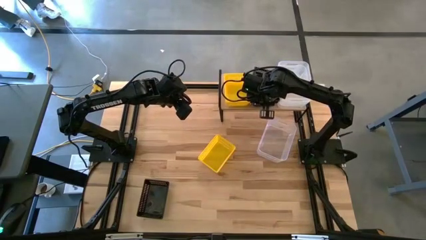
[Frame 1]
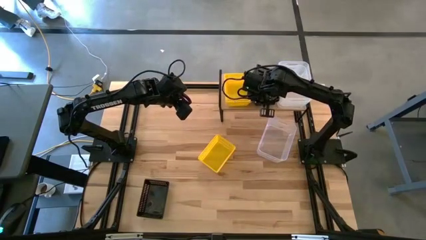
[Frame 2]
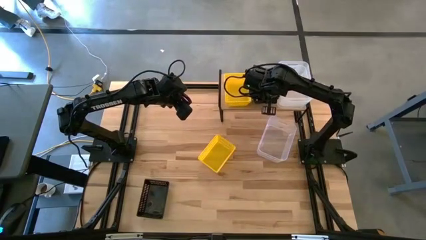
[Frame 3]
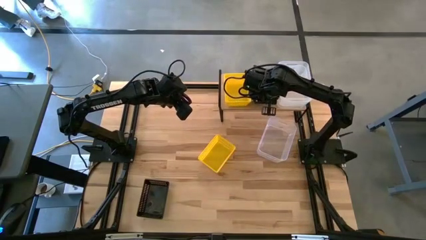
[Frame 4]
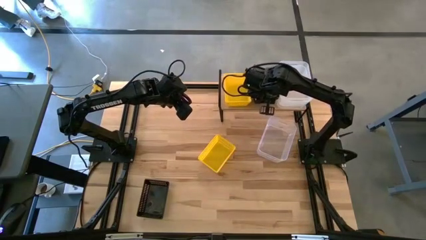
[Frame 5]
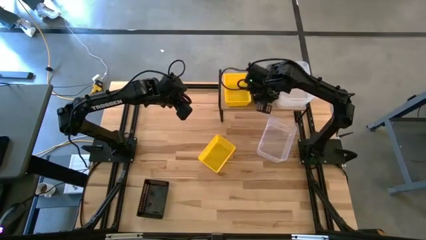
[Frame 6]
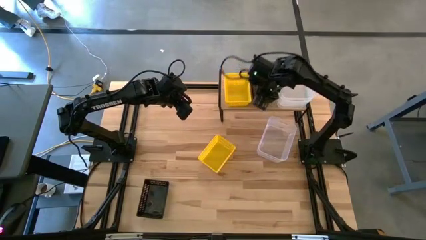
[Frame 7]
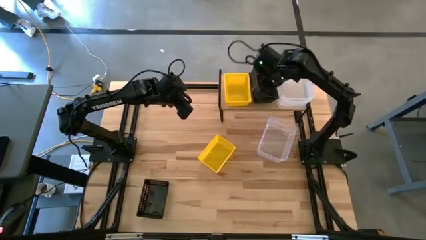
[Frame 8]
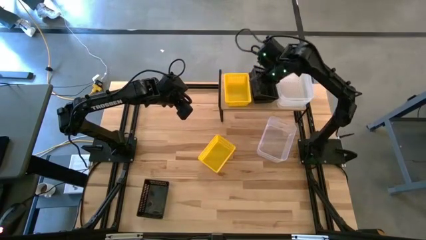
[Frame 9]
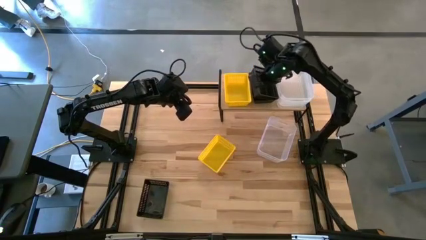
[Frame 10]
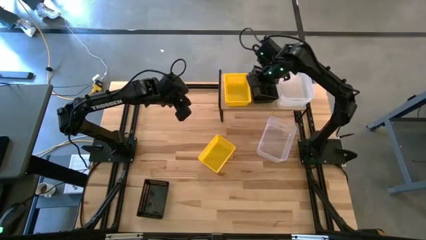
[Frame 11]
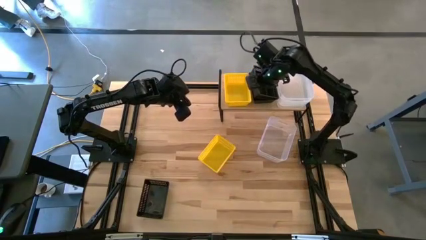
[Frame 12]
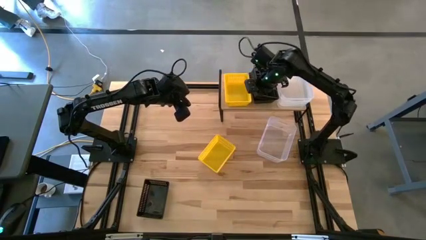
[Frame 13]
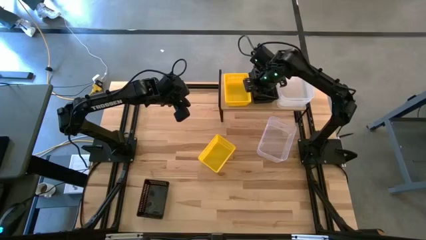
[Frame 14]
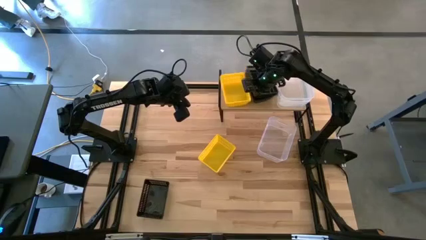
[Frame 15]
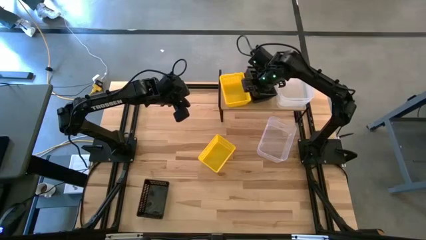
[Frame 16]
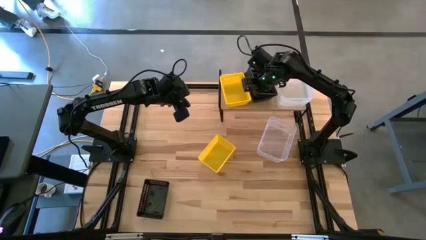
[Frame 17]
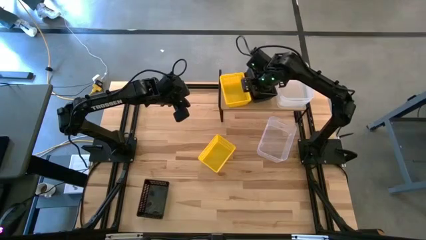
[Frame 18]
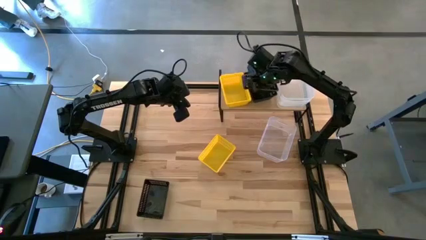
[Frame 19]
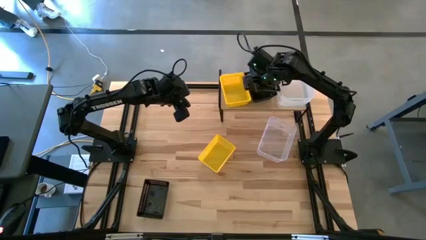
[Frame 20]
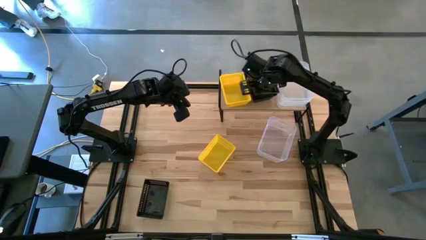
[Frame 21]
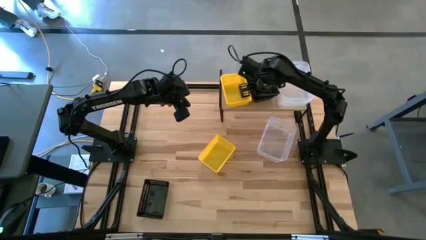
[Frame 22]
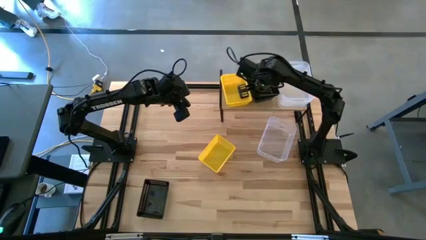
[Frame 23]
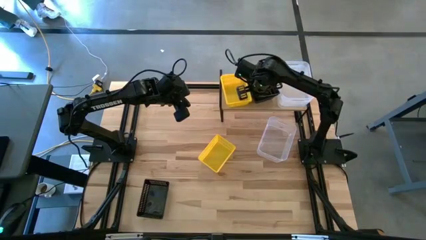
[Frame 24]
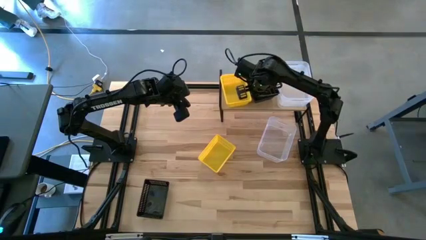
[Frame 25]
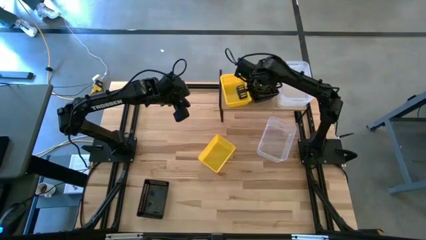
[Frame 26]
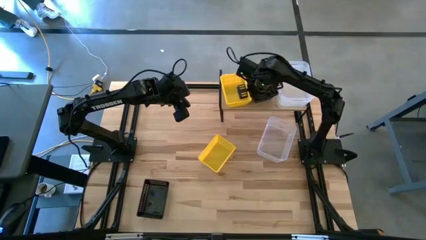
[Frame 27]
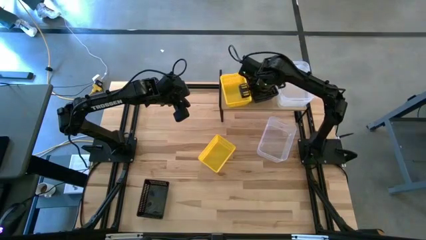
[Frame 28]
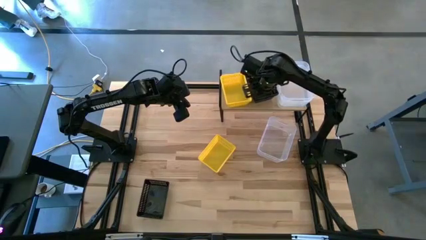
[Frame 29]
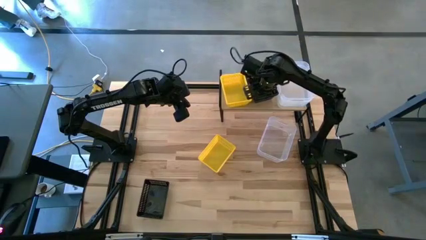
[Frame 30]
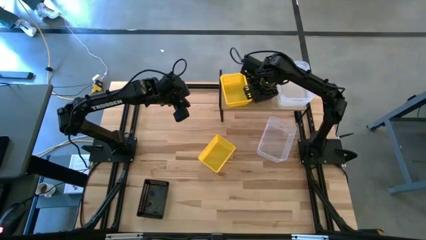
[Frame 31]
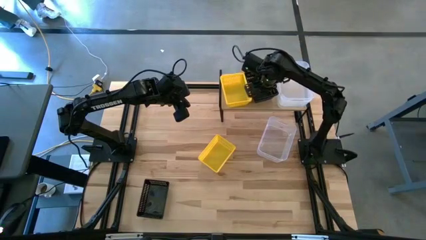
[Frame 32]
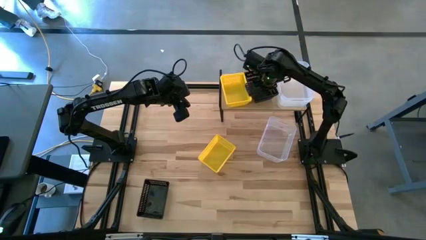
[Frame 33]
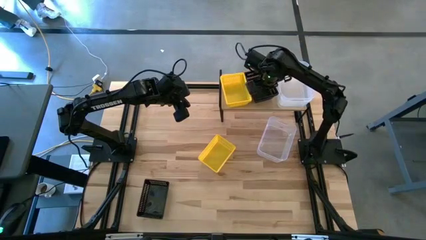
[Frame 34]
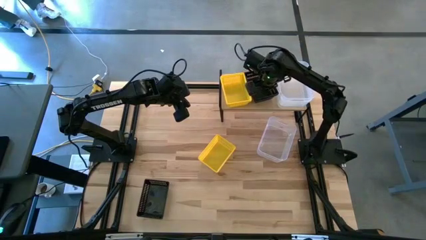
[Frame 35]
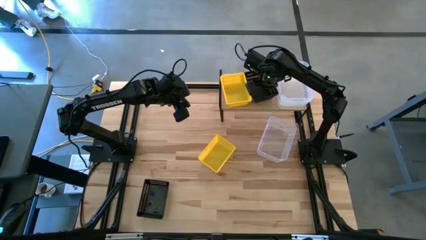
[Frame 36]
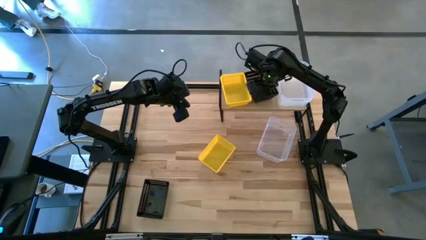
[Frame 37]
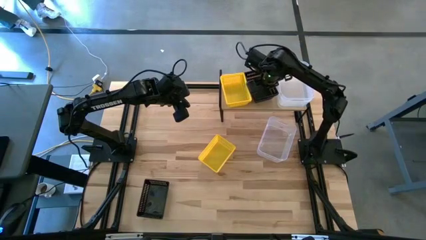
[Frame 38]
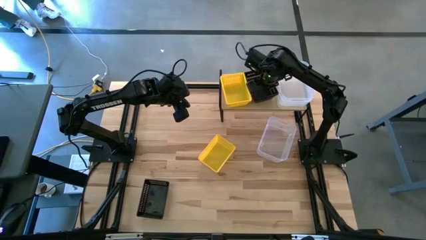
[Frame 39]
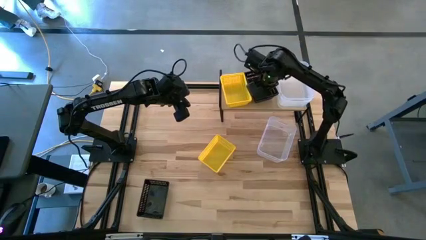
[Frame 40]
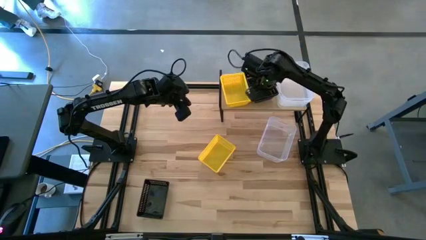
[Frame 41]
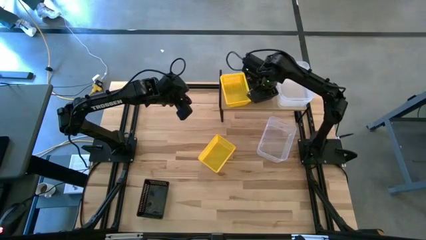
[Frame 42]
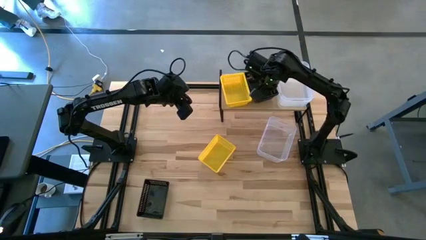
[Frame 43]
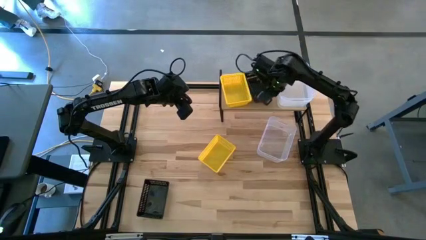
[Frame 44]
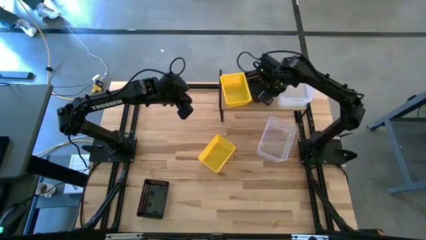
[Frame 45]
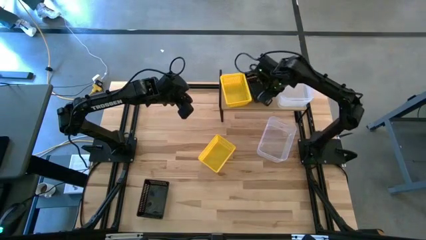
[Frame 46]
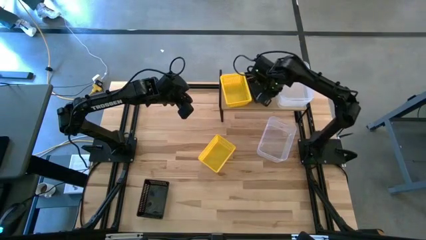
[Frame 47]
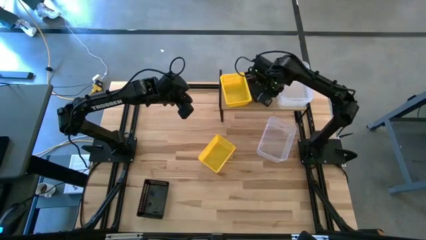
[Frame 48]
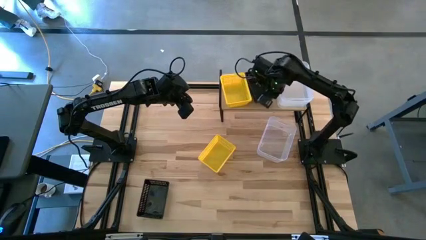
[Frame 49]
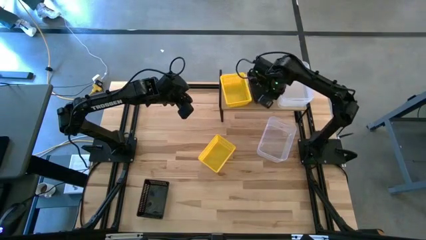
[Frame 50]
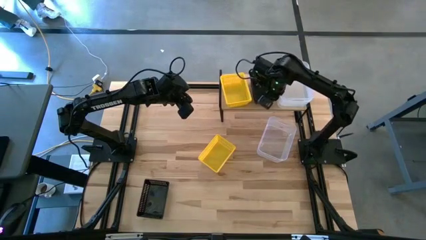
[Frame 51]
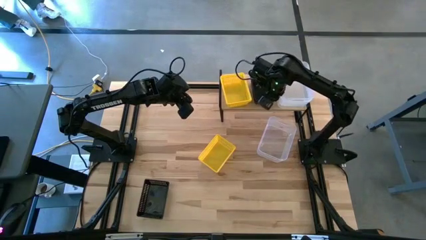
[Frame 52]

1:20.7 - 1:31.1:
Task: Stack baskets on shelf by color
Stack the right black bin on top of the other black bin on the shelf

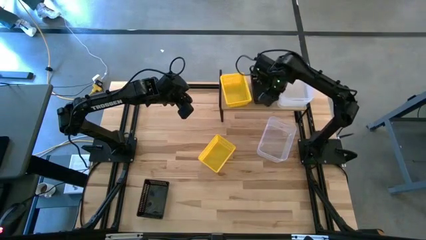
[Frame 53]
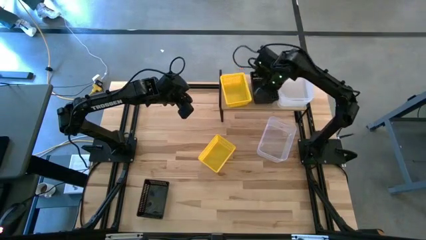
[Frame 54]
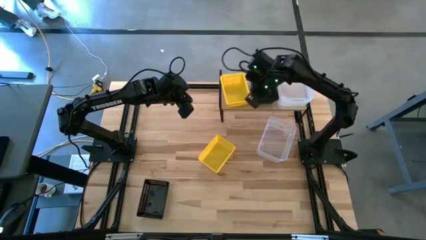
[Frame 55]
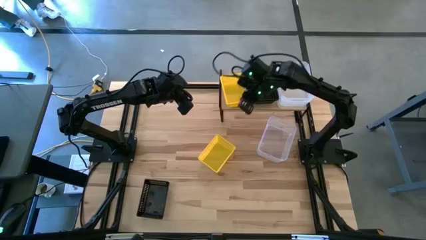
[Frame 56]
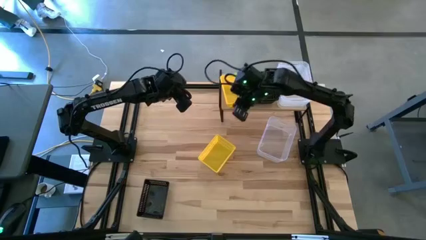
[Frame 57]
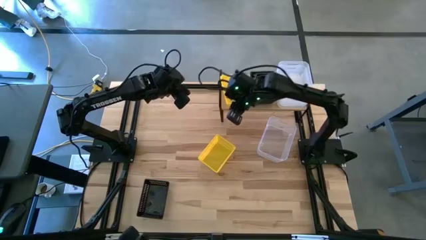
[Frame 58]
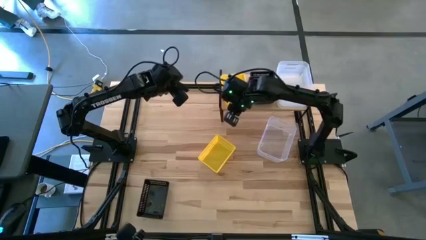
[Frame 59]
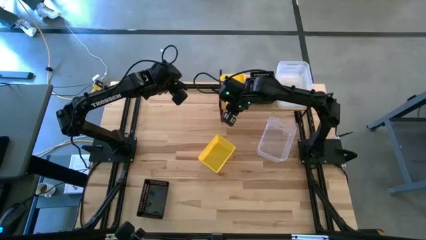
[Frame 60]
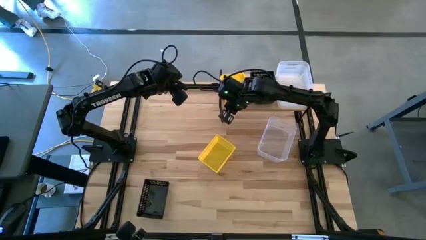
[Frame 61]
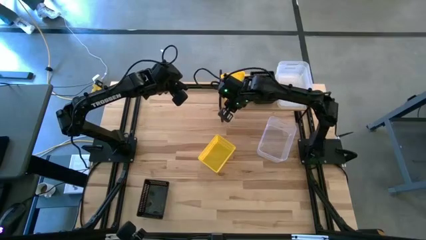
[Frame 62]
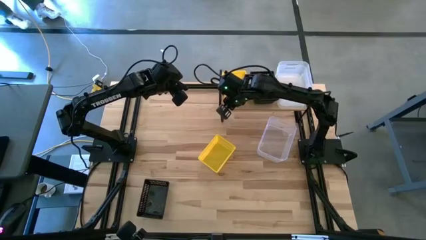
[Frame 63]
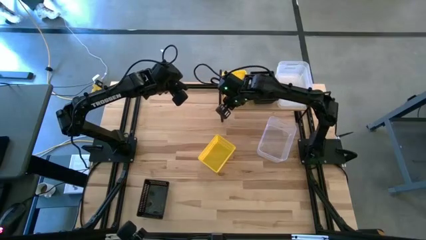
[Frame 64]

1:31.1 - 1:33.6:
Adjust the yellow bins on the shelf
